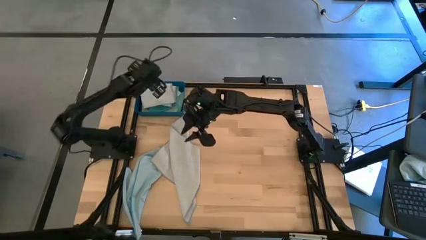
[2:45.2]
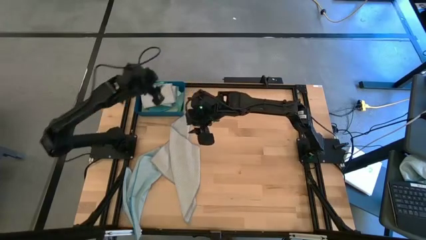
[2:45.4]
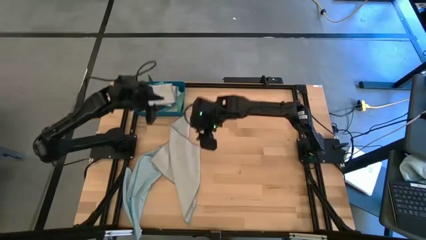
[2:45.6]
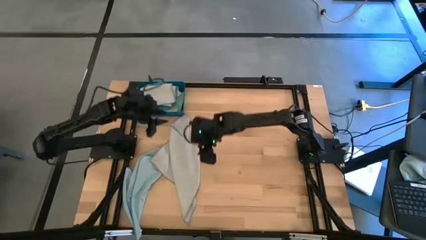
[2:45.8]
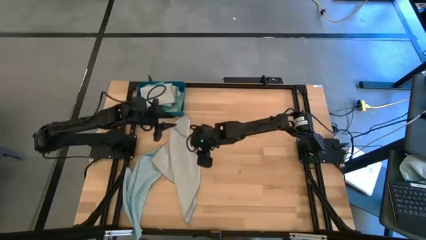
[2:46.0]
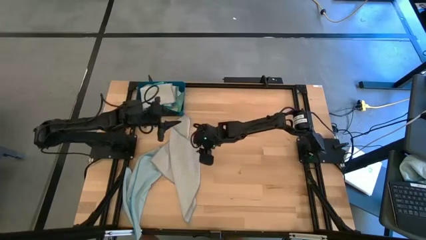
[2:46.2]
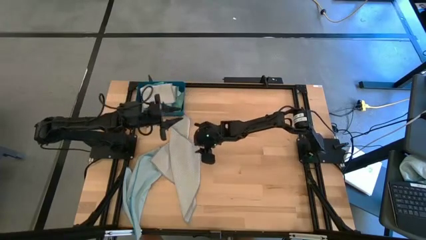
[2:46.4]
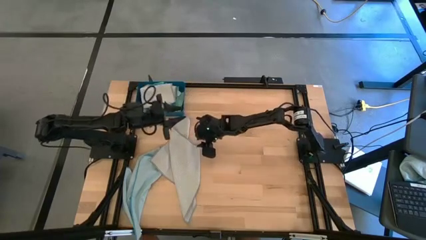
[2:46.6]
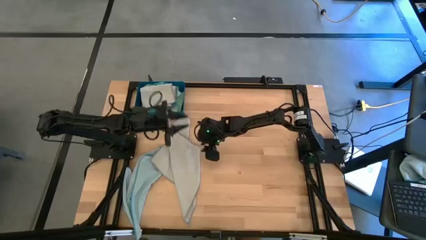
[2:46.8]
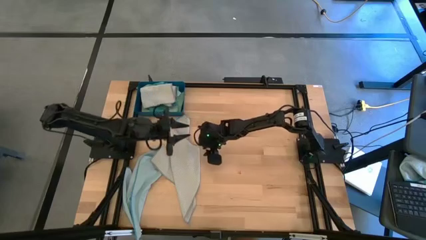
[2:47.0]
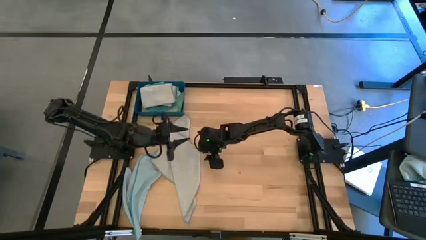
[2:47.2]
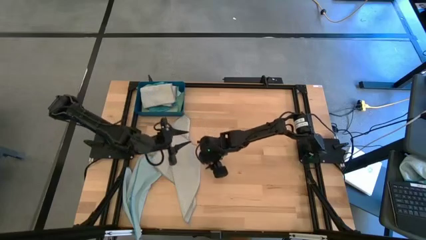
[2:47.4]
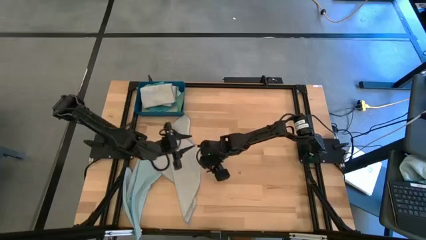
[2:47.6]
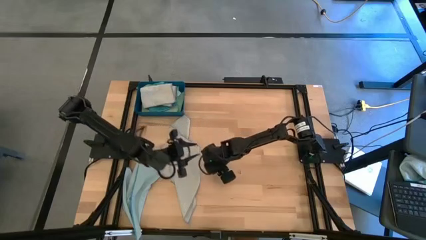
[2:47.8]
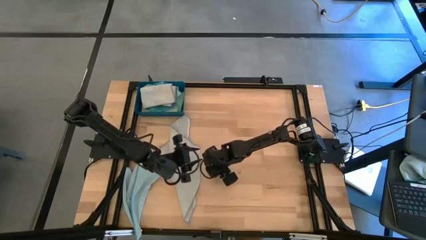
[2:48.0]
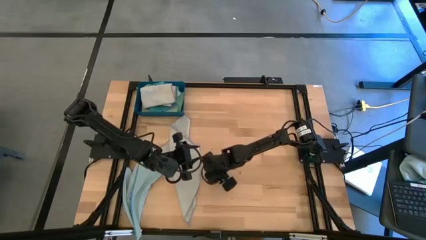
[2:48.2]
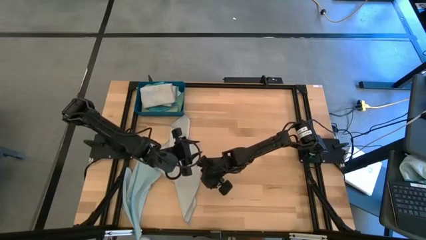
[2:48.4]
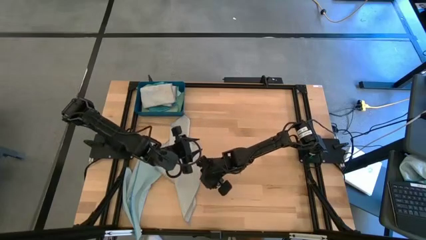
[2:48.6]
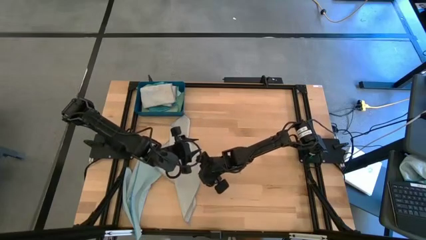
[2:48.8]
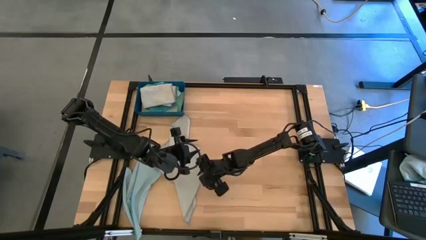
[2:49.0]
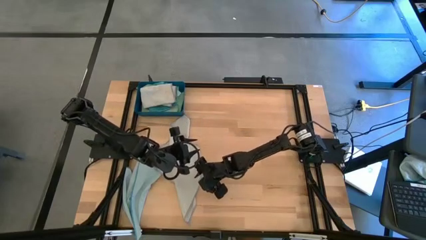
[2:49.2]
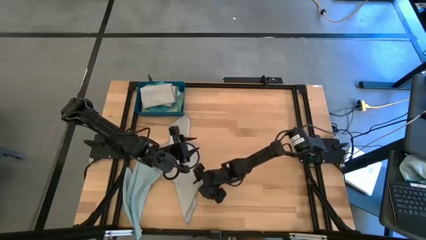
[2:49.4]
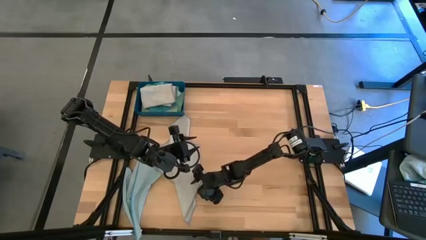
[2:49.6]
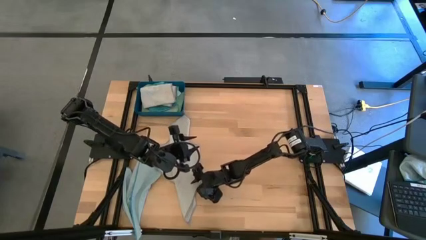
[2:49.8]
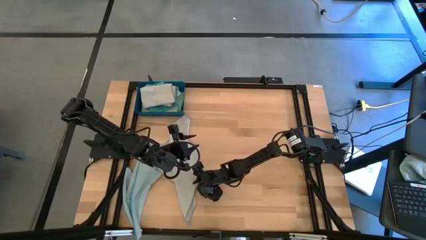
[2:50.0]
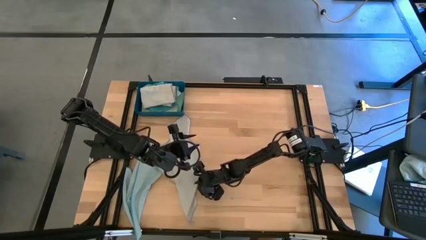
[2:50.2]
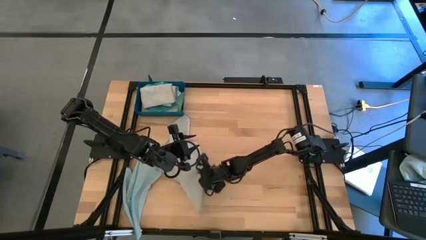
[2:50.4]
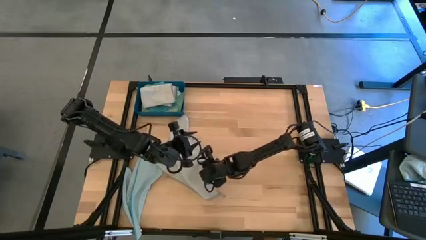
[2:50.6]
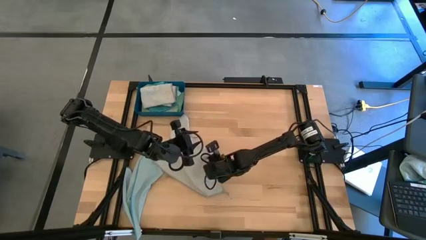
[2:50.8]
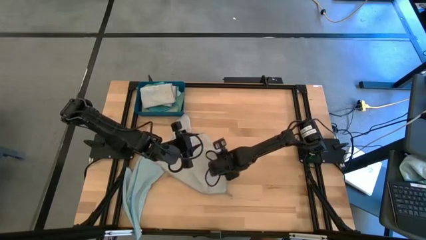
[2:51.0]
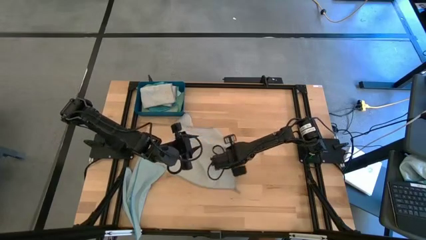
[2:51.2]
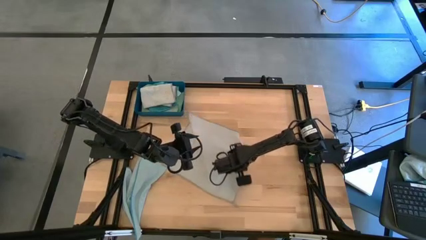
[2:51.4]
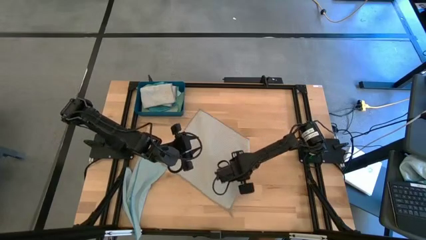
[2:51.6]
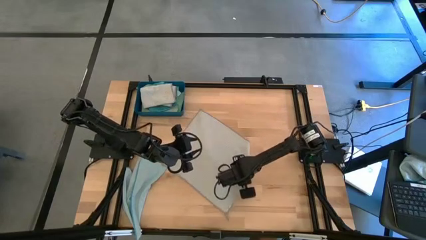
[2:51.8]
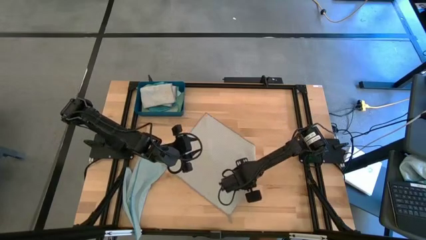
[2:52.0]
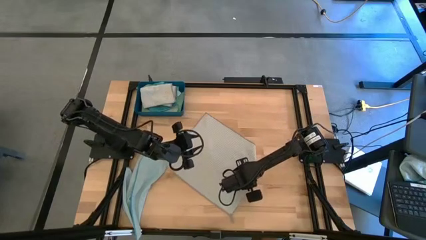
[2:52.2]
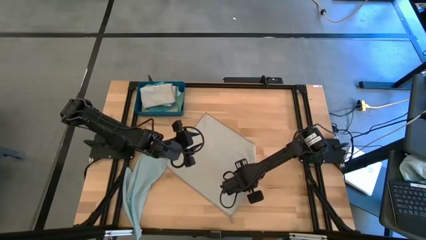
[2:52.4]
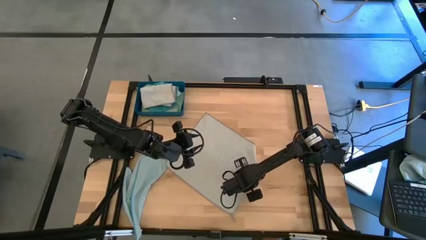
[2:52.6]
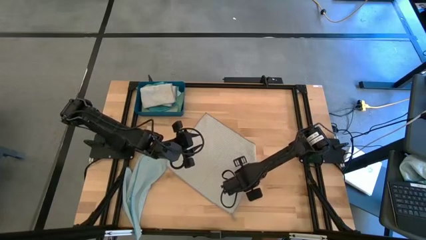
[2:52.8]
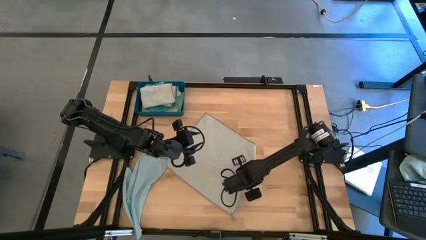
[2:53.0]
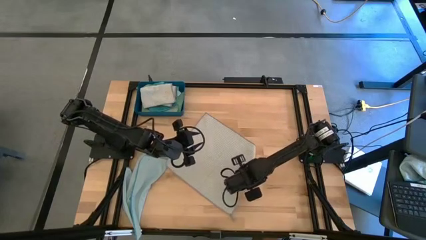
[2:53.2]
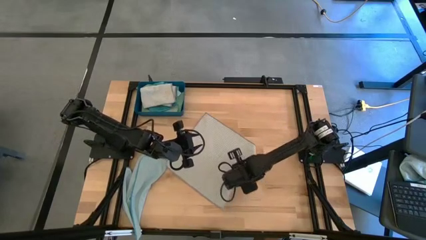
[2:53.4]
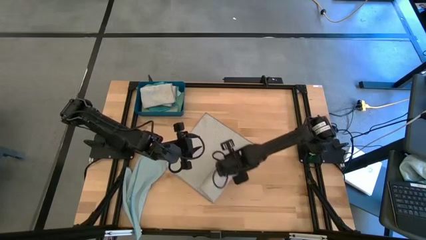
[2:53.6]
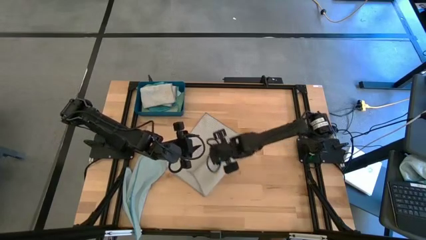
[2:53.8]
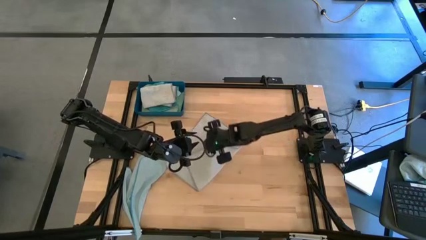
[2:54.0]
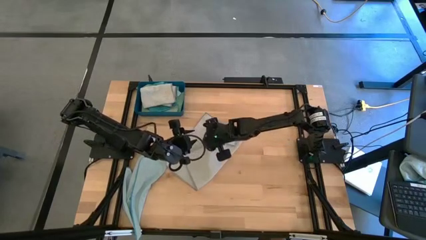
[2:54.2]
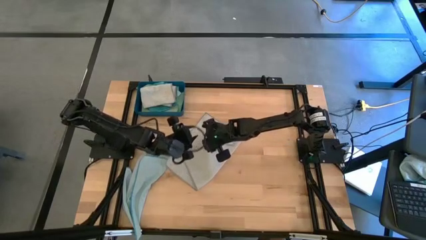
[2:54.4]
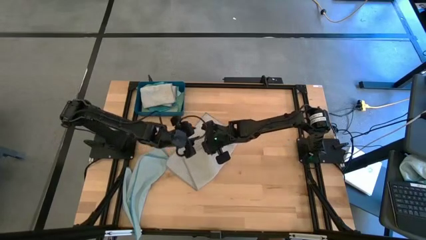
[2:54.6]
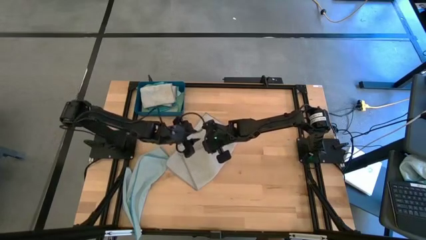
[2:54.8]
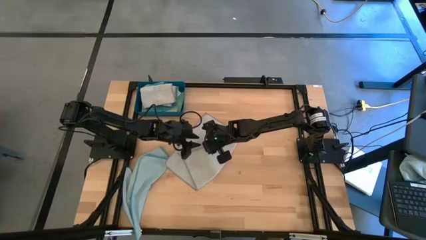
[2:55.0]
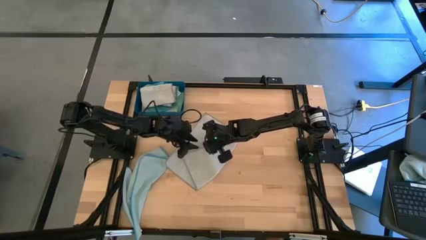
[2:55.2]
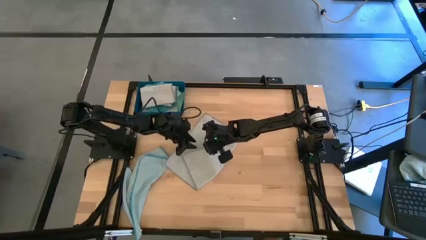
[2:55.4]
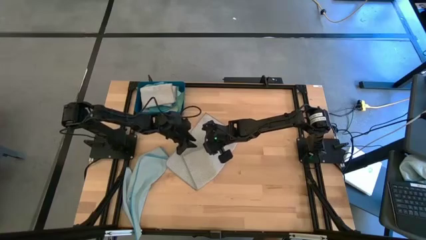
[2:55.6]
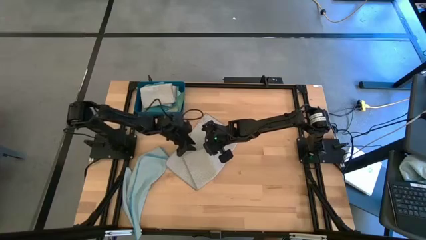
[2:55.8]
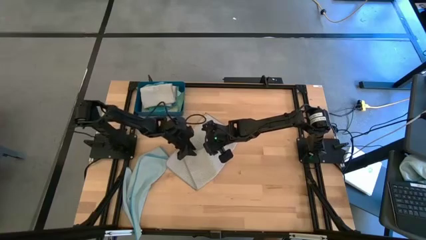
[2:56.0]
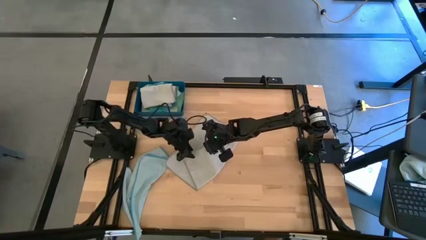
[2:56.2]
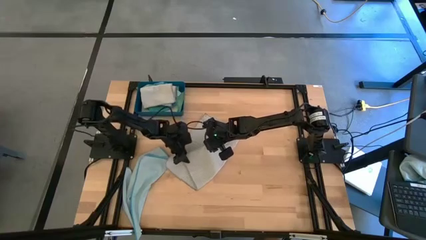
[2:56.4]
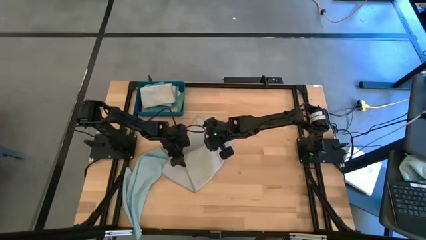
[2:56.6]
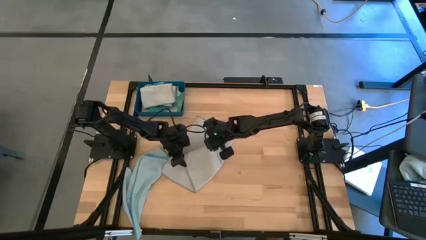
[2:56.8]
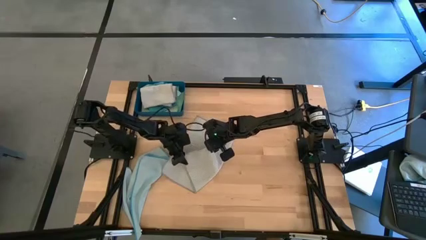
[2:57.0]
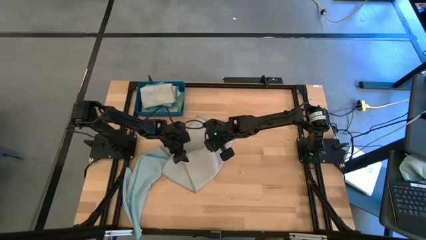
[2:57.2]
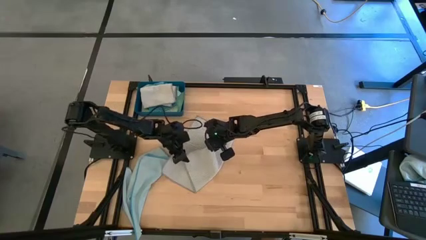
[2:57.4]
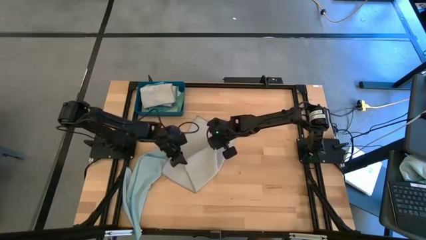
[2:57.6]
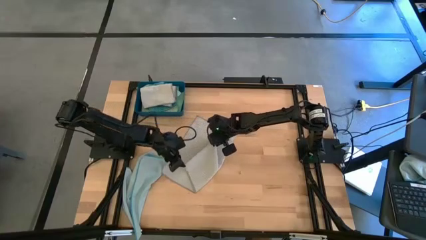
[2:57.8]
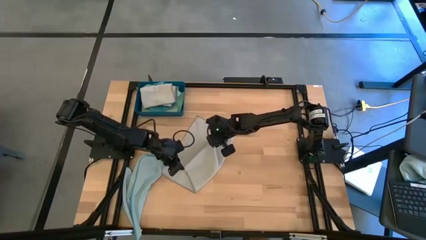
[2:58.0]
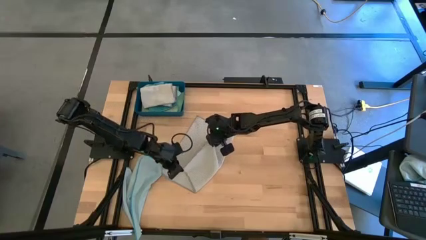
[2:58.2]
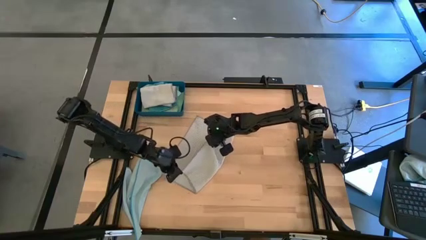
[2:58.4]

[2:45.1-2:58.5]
Task: Fold microfiber towels
Fold the gray towel
